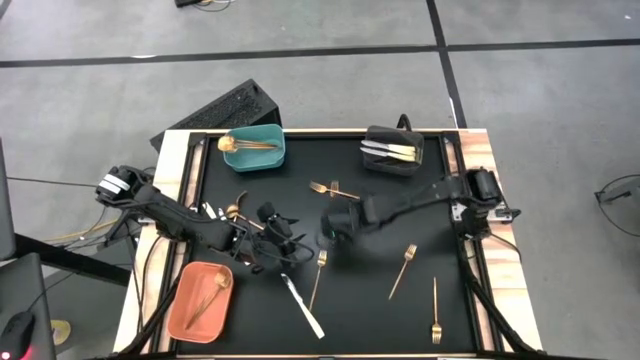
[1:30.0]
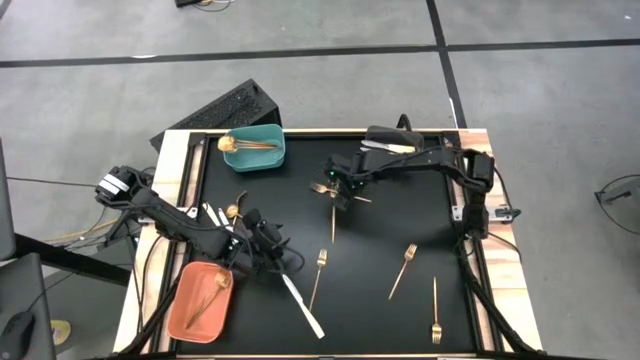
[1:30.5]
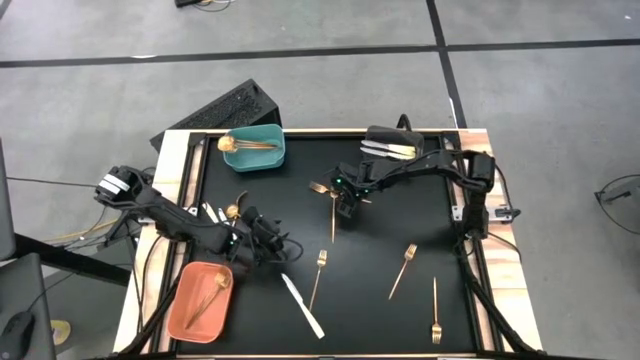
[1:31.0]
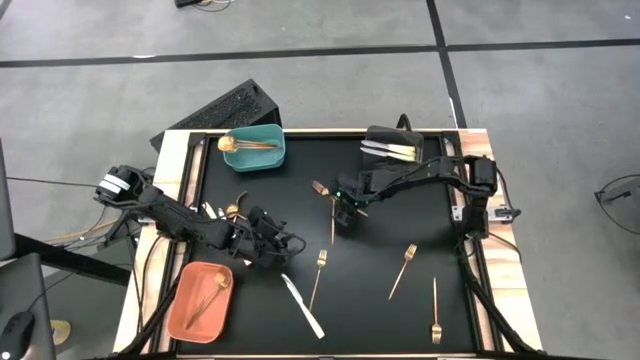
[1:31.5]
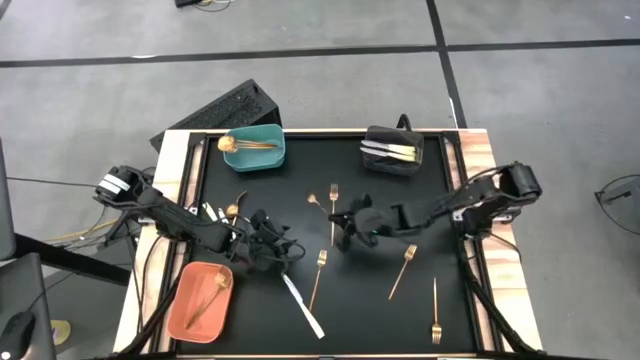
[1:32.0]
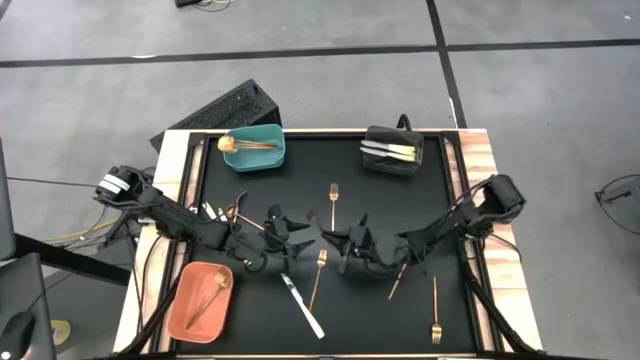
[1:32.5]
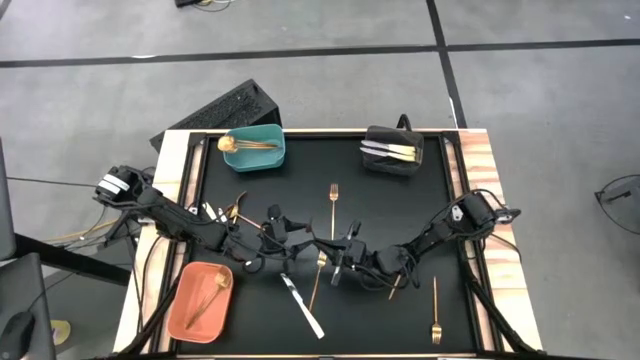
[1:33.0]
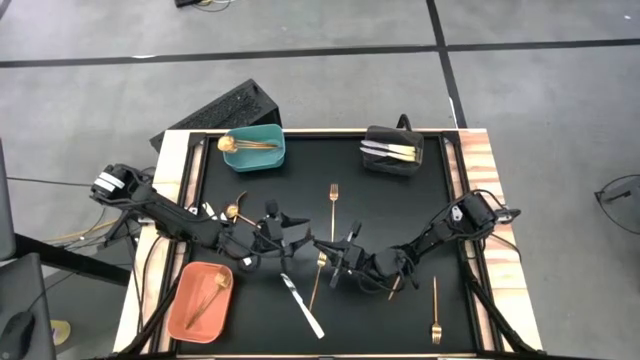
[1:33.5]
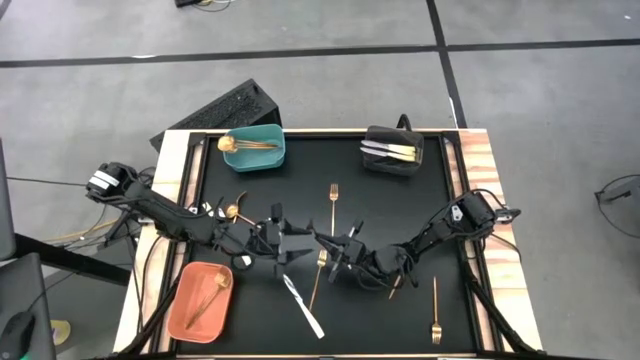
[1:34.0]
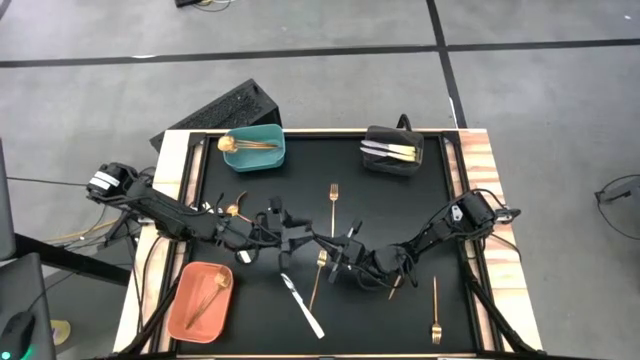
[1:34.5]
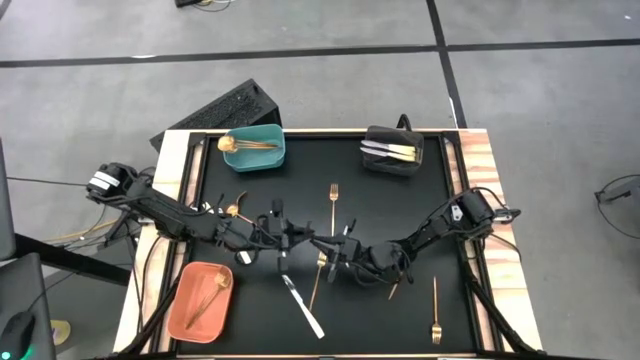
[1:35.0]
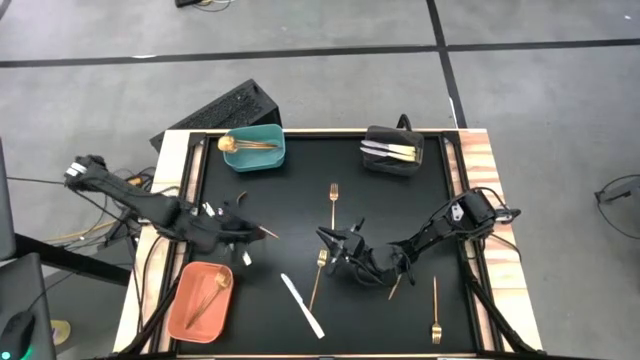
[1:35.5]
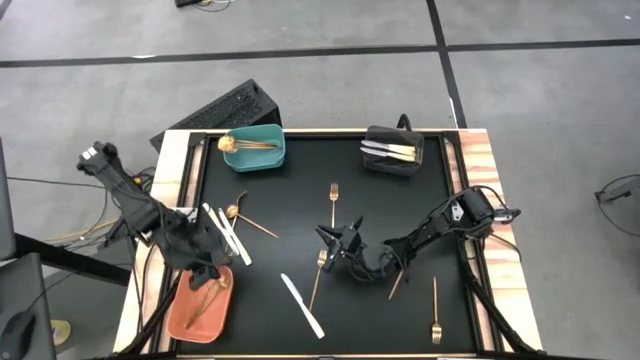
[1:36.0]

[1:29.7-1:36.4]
Task: Sort silverware by color (type)
Put the gold fork into the orange bin

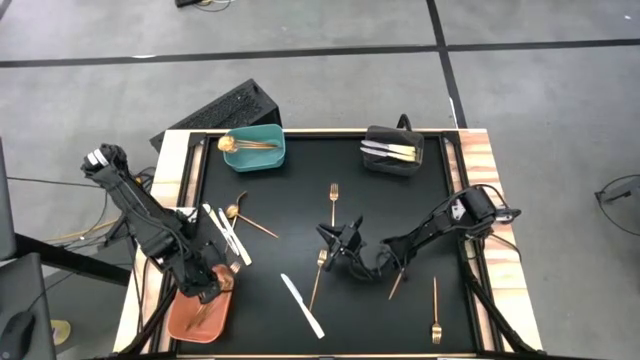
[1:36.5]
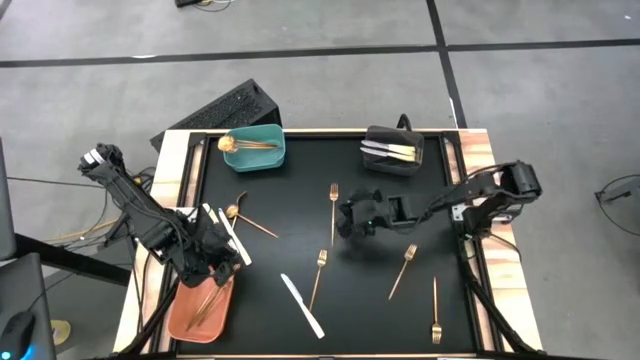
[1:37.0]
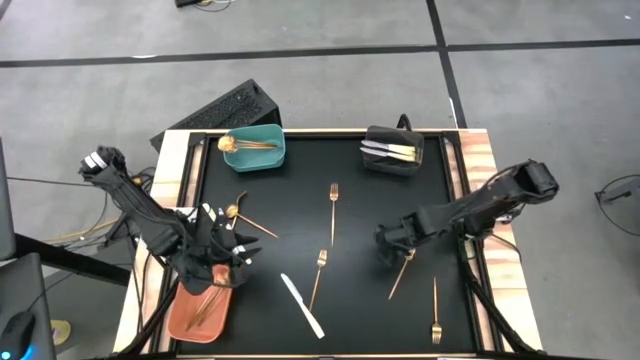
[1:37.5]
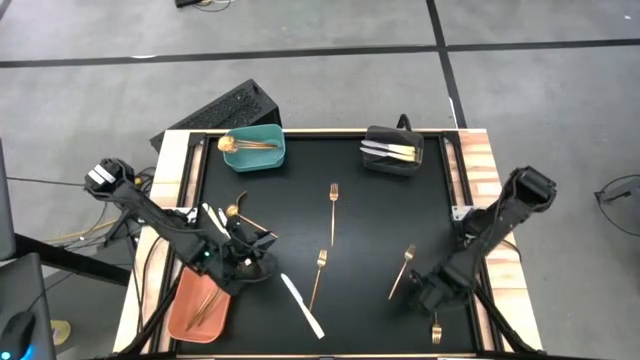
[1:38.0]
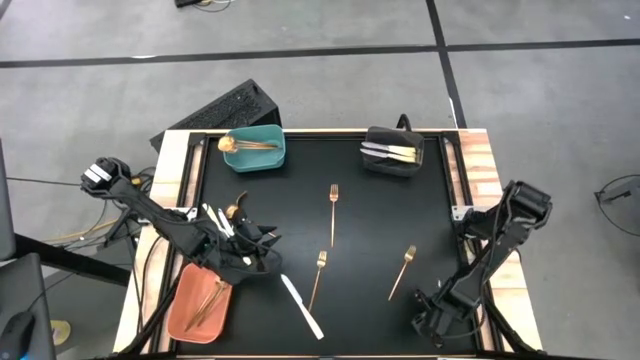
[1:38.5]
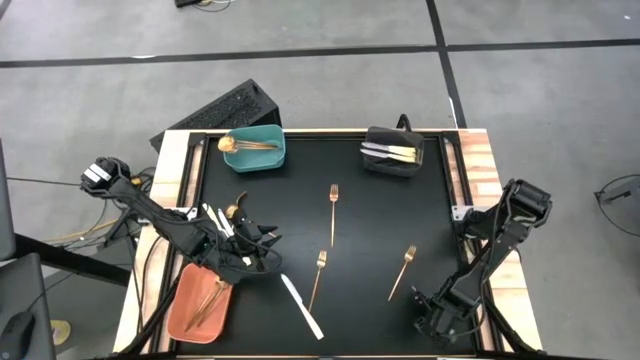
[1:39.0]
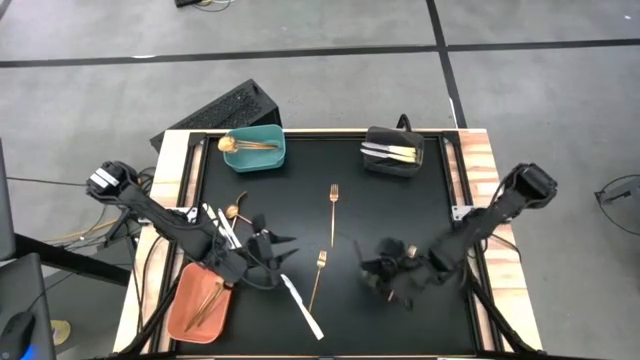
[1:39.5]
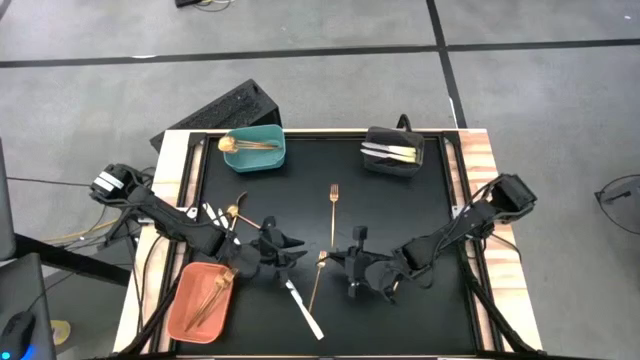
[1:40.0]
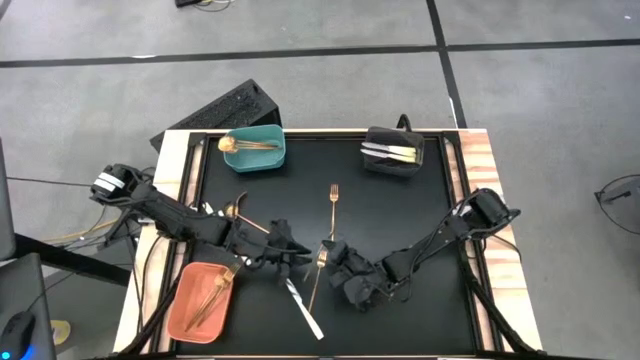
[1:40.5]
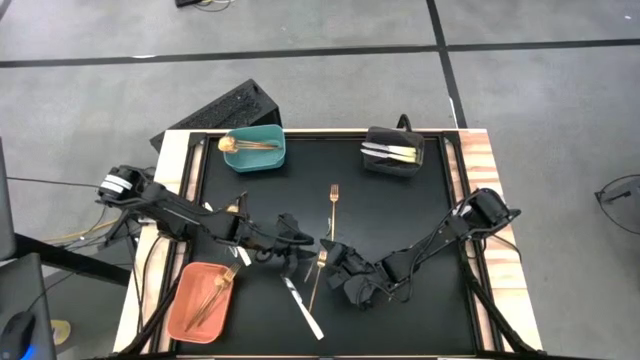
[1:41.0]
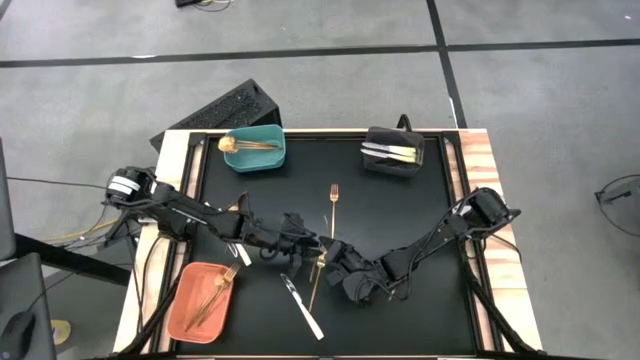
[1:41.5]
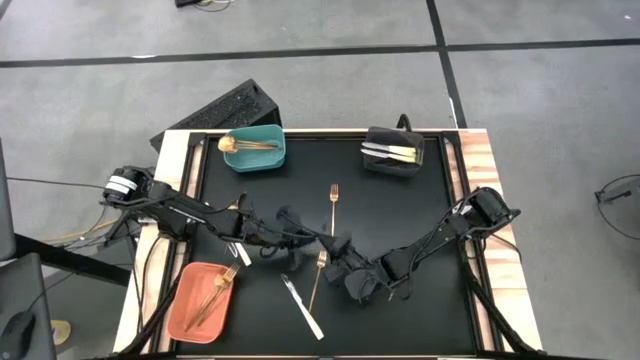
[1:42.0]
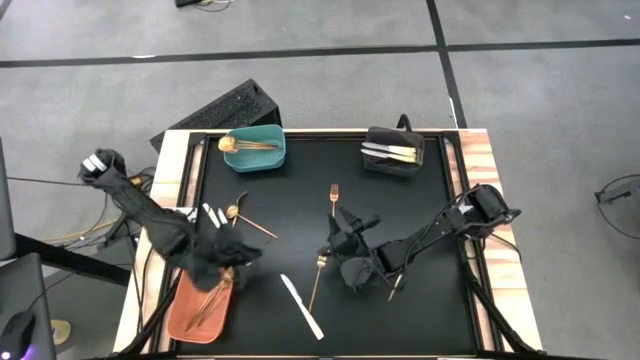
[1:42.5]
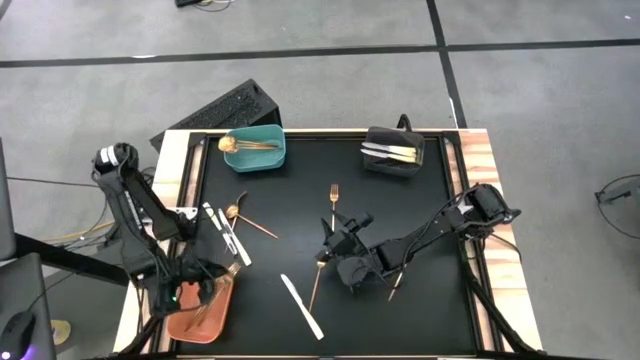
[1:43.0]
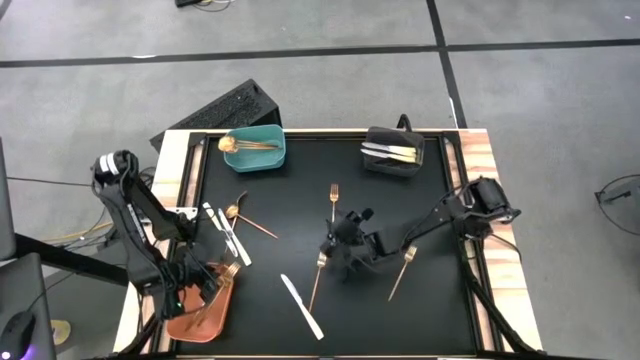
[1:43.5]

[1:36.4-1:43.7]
Put the gold fork into the orange bin

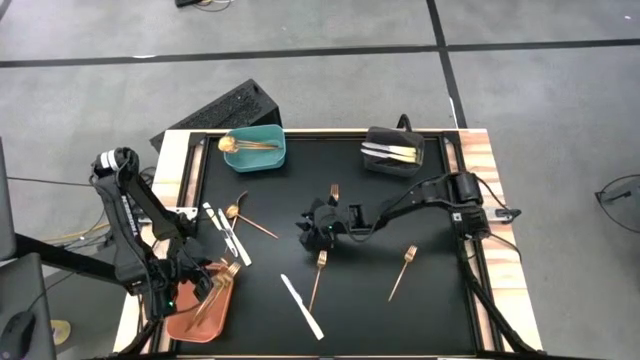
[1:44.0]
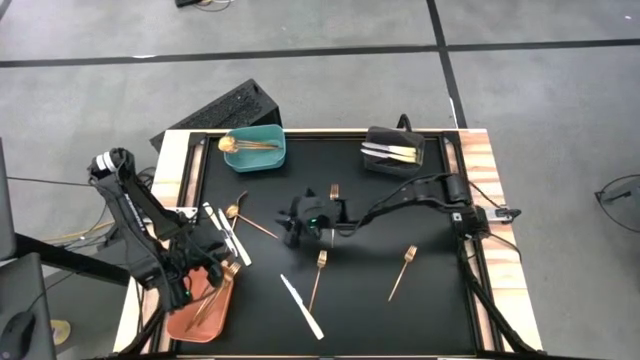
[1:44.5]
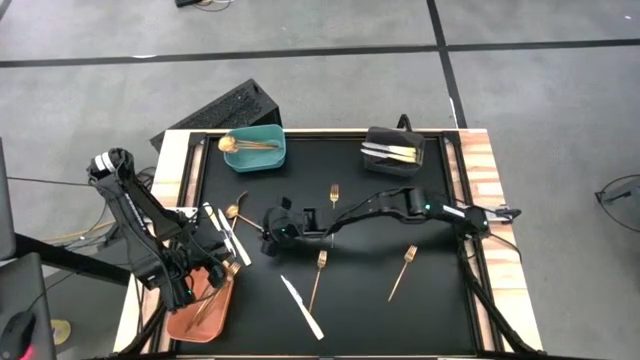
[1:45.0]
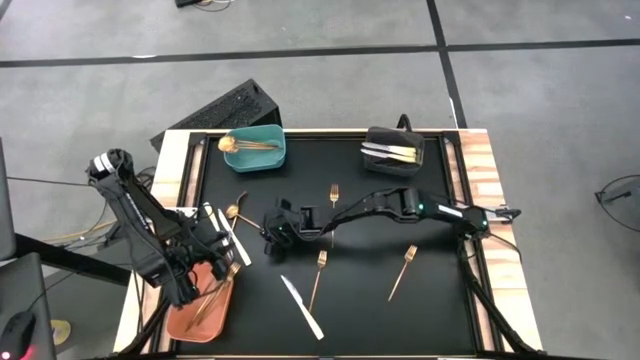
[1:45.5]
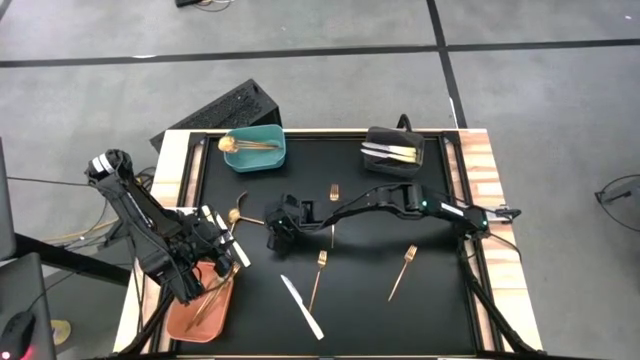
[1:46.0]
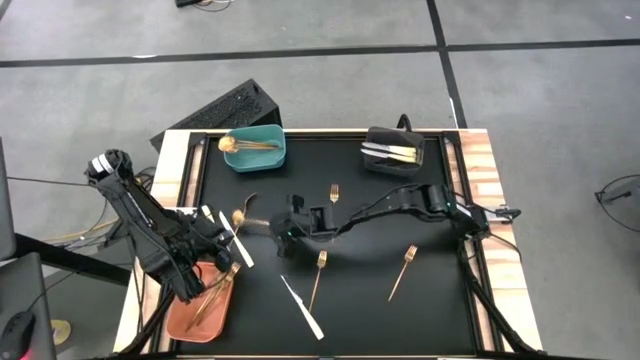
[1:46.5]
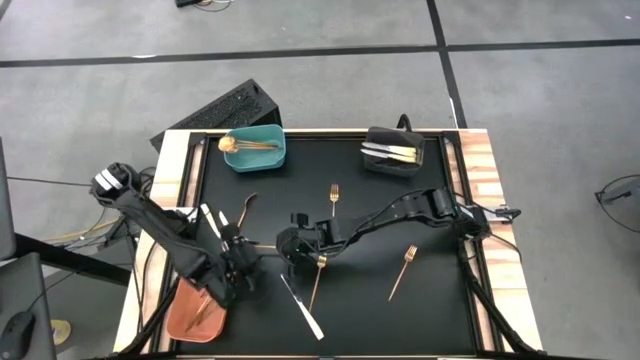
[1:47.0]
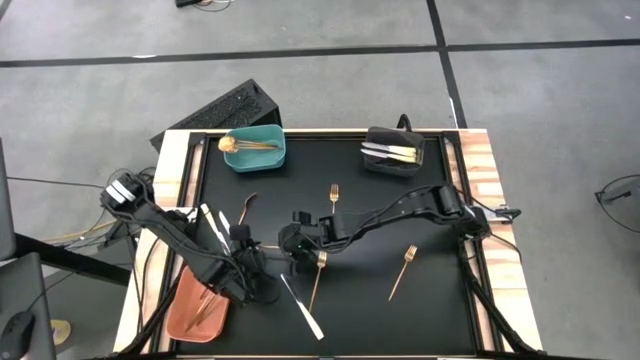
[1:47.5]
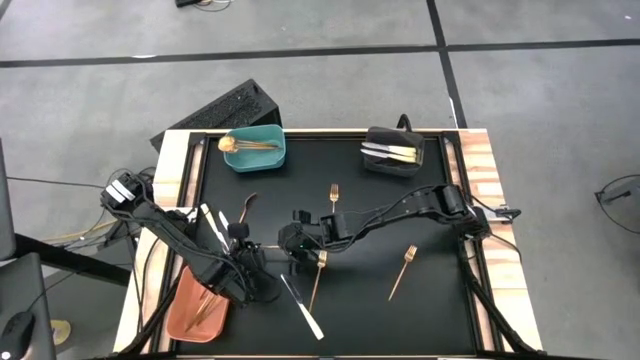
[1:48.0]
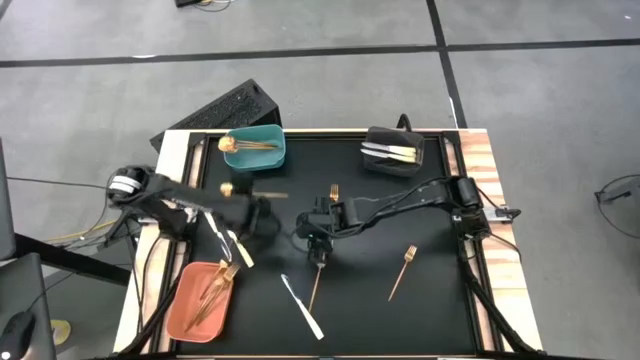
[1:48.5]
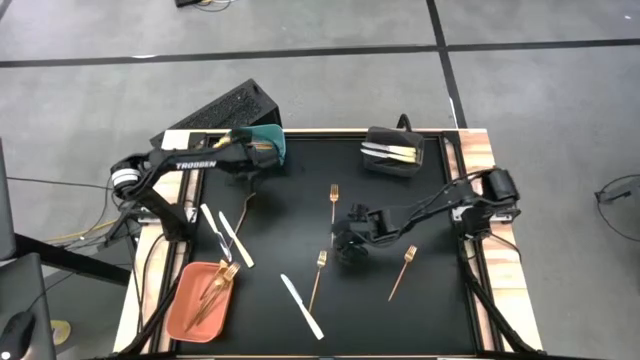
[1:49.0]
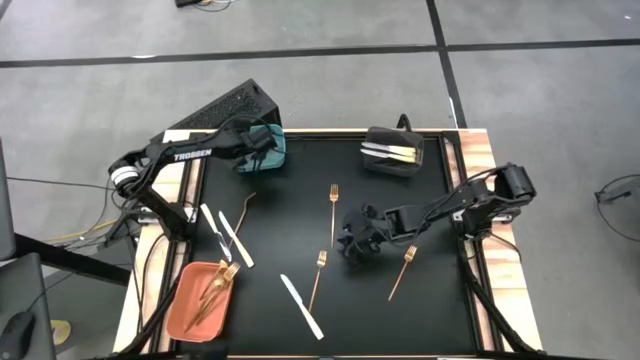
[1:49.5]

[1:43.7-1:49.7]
Put the gold spoon into the green bin

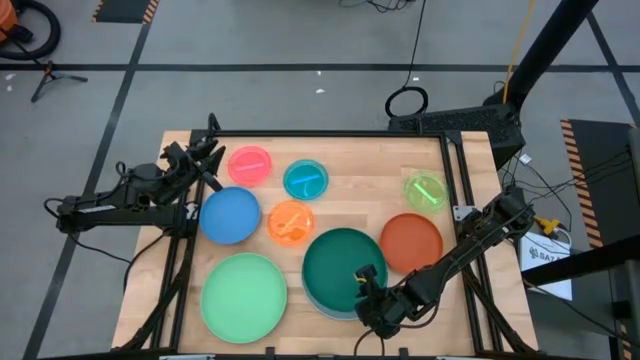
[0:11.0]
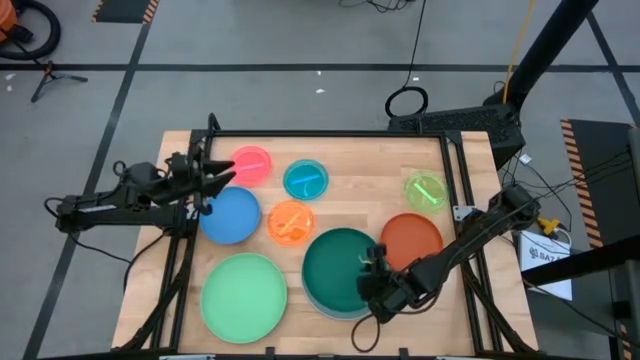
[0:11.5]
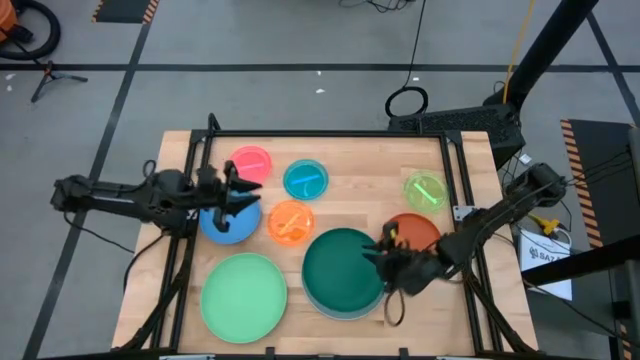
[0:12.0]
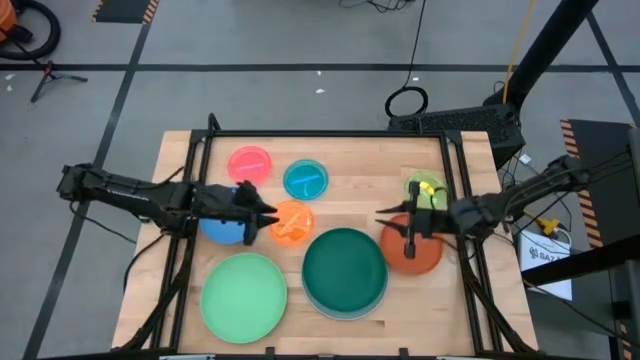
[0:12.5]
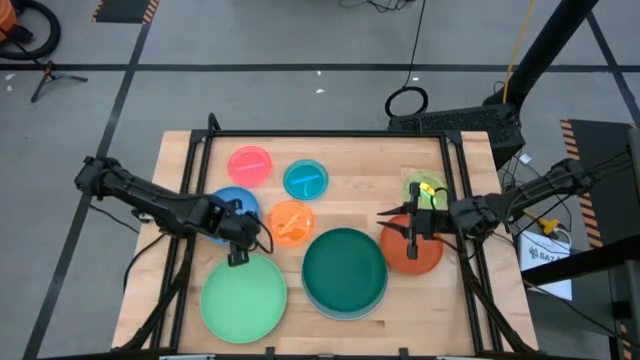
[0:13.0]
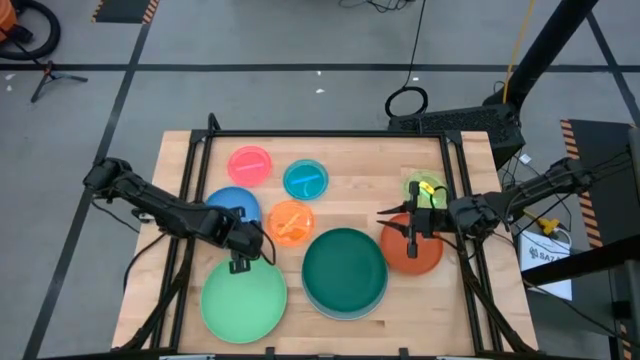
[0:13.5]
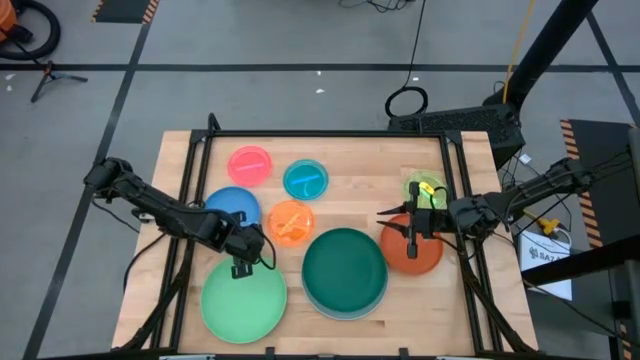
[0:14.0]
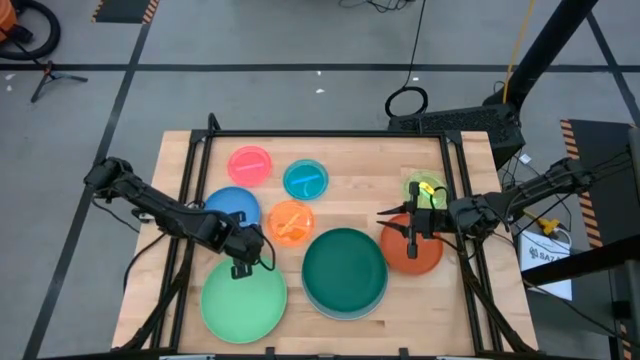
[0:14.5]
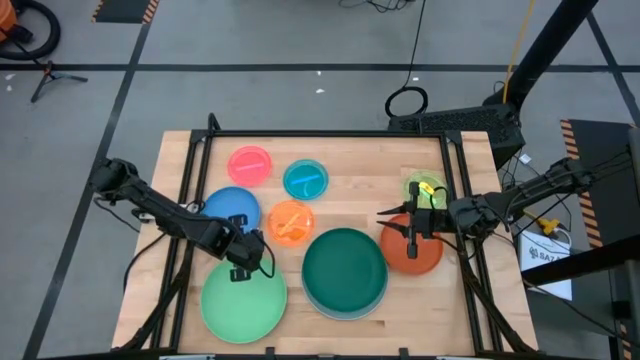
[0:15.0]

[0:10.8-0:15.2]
Task: Stack plastic plates
Stack the light green plate on top of the dark green plate
